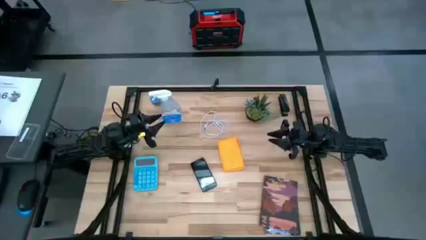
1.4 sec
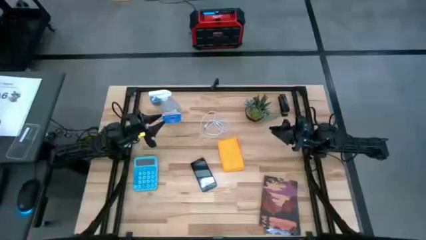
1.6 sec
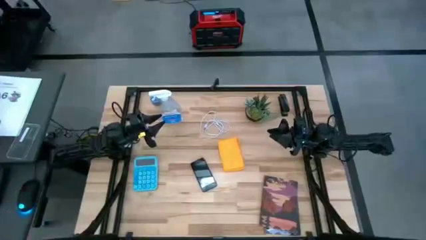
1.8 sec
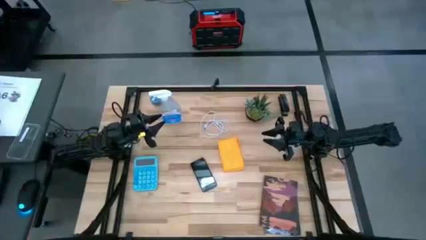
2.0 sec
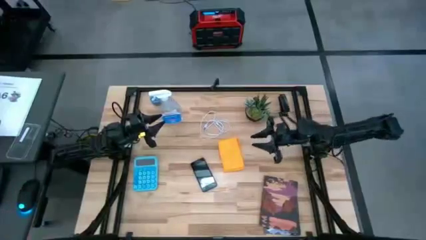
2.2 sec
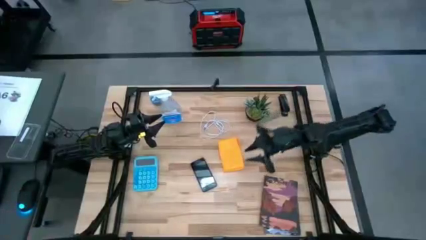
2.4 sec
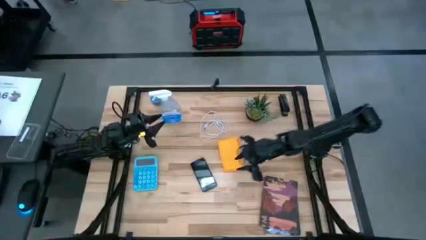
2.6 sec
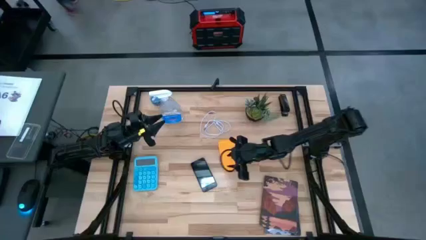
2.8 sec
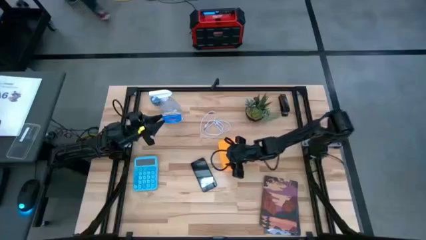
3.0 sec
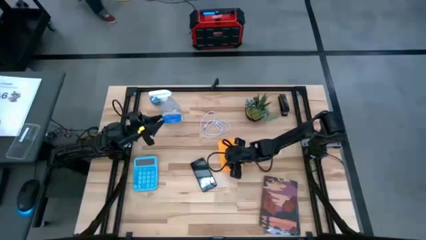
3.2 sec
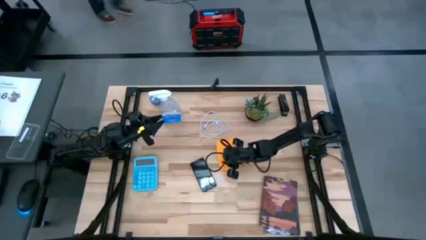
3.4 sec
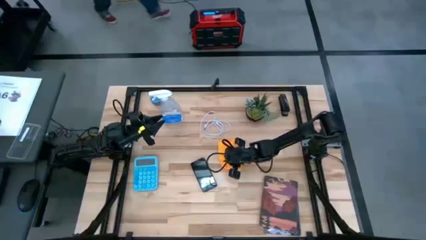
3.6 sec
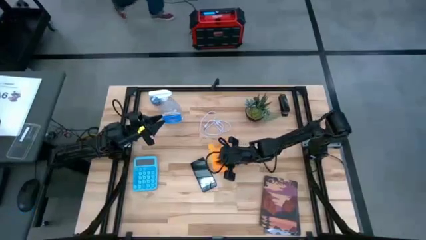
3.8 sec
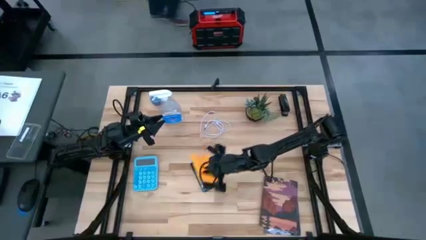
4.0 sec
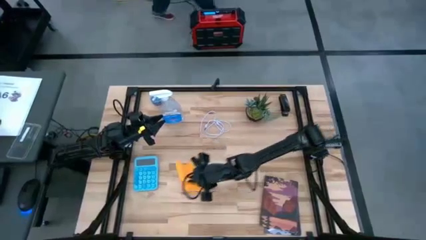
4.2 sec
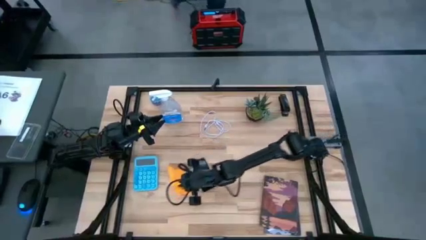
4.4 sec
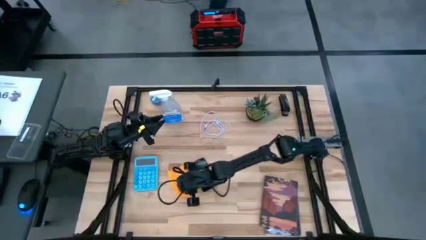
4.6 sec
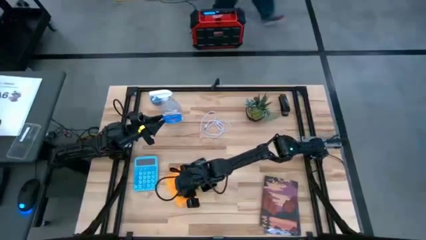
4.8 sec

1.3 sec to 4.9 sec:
Task: Apply microfiber cloth
Move the yellow microfiber cloth to the middle left of the table

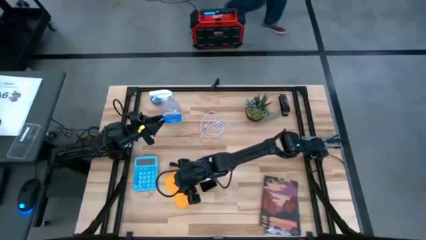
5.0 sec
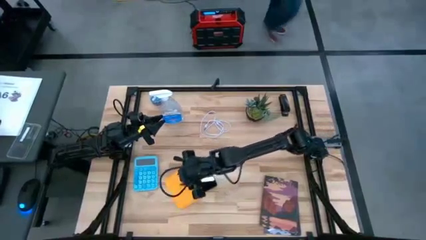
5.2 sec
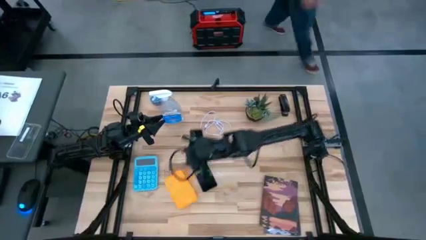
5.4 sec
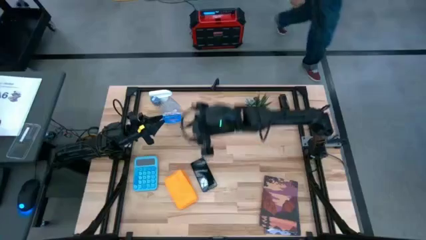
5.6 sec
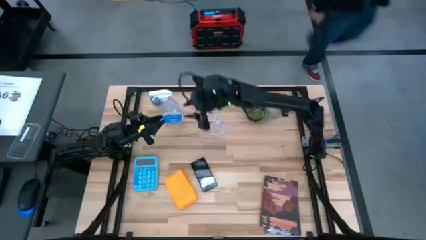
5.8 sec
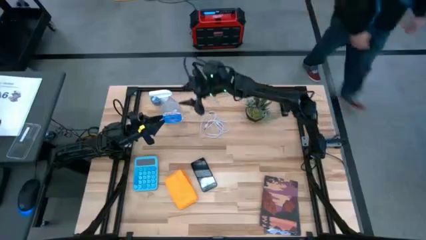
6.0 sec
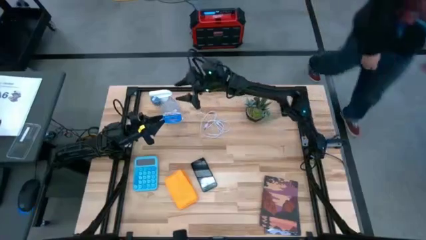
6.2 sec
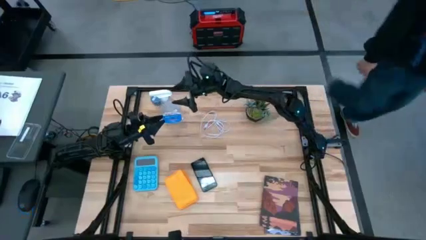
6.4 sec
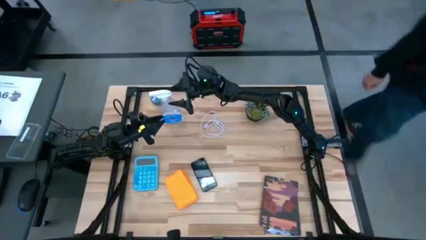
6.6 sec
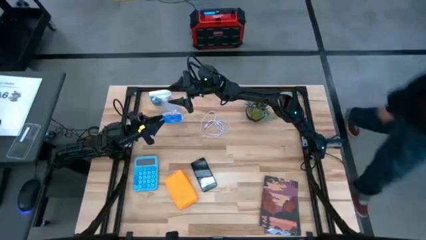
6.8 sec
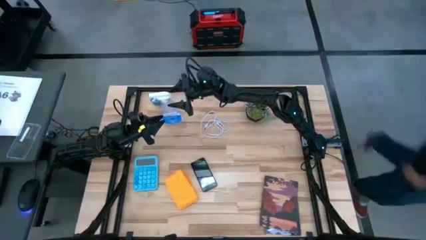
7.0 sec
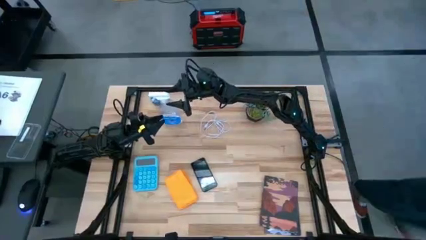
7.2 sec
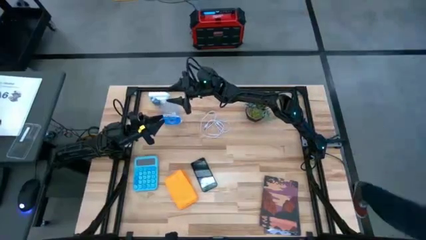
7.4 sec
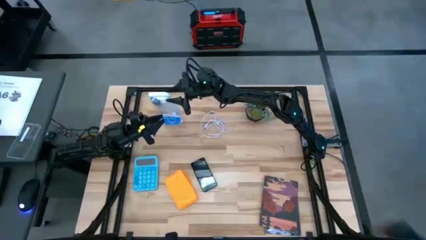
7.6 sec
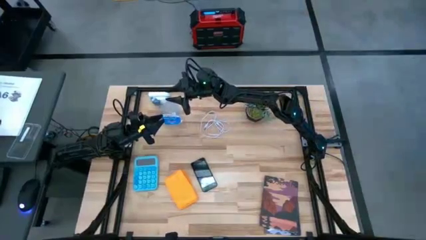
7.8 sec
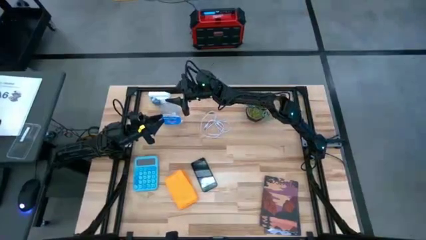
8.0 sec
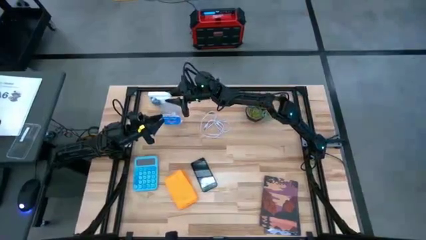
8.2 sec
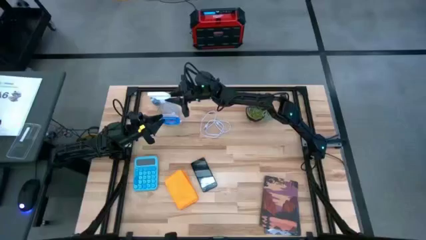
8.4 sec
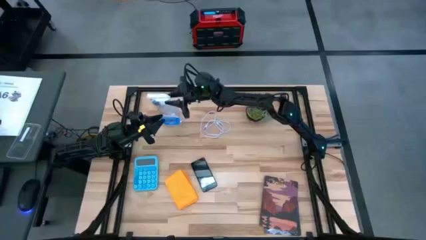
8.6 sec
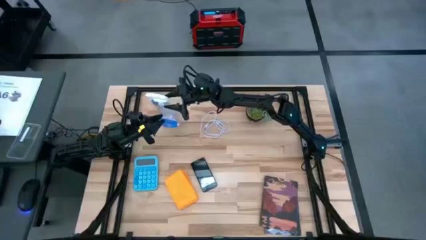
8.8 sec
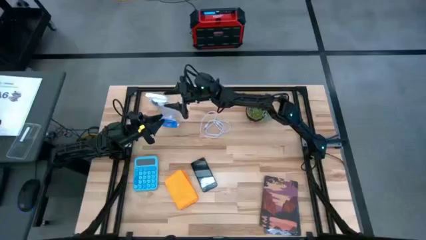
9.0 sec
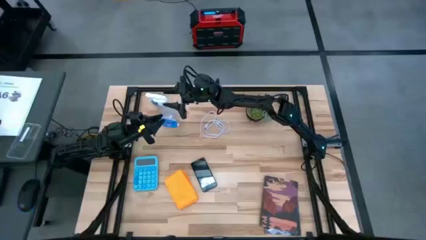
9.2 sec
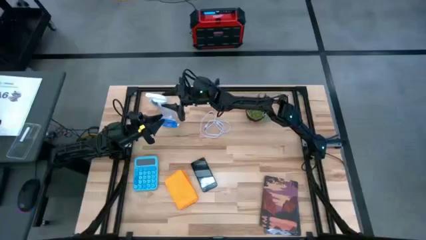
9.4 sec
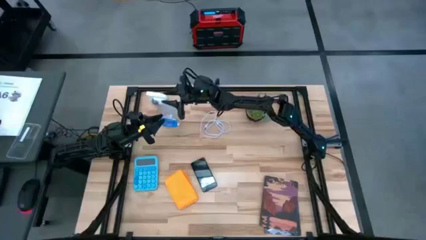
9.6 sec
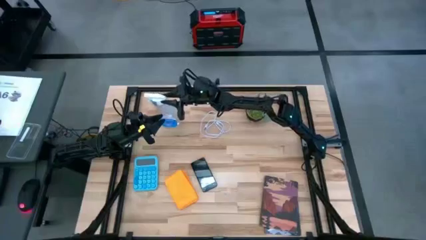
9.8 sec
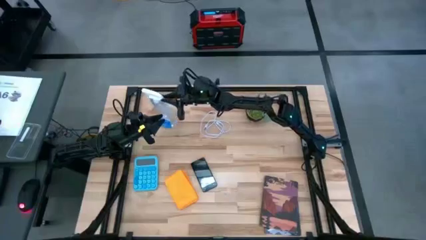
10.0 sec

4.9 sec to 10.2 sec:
Move the spray bottle to the center of the table

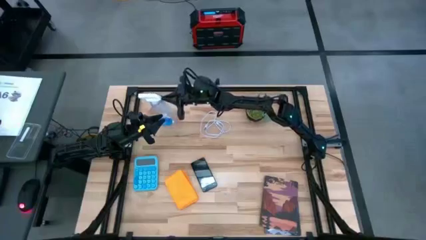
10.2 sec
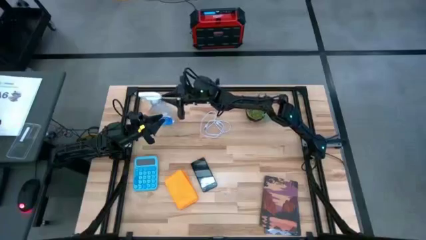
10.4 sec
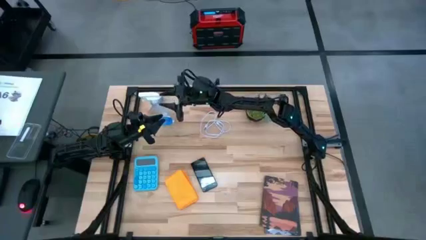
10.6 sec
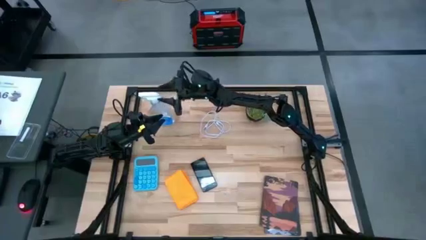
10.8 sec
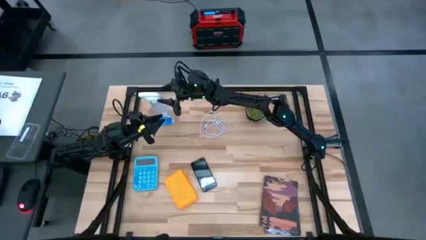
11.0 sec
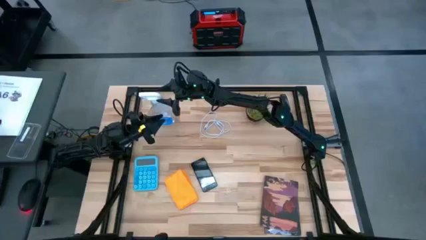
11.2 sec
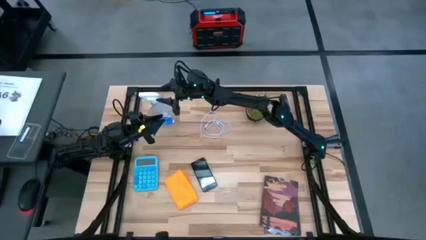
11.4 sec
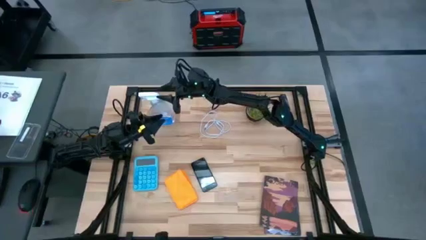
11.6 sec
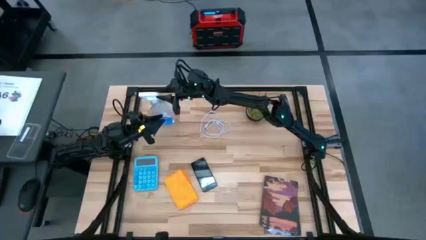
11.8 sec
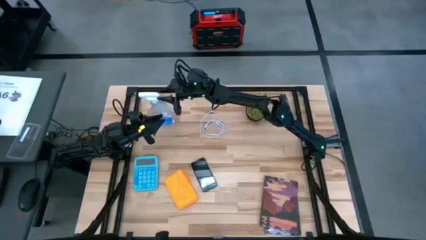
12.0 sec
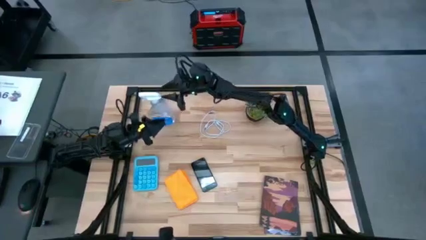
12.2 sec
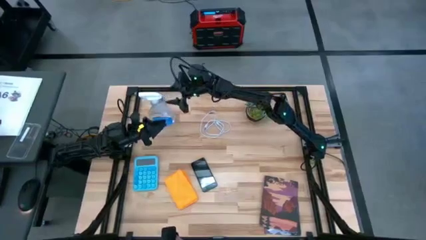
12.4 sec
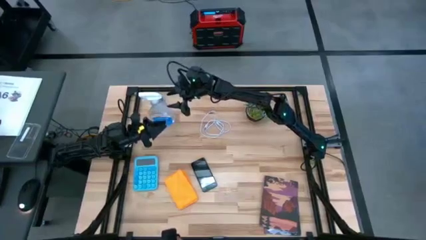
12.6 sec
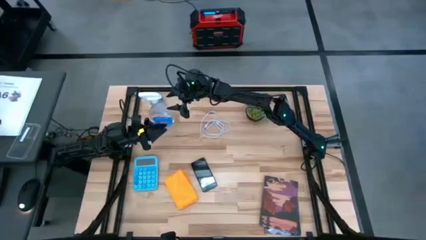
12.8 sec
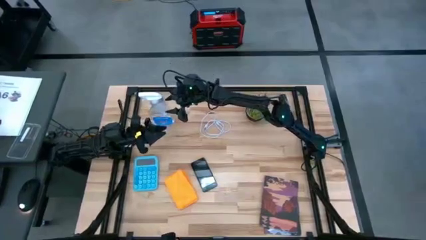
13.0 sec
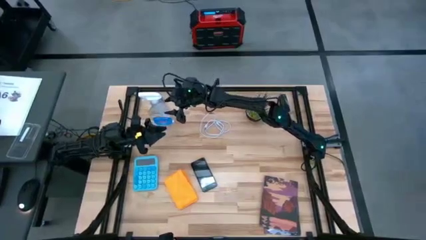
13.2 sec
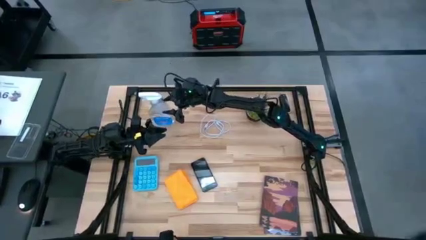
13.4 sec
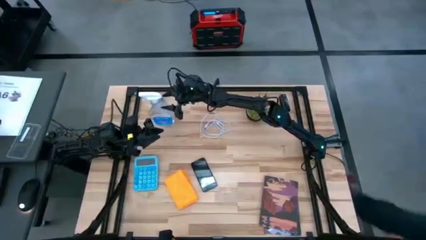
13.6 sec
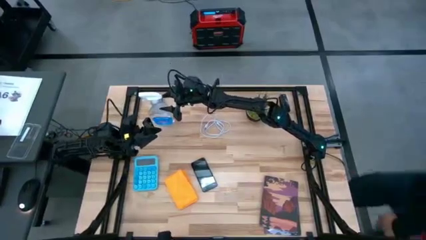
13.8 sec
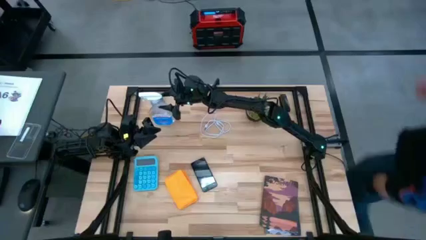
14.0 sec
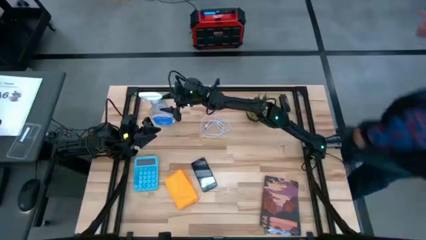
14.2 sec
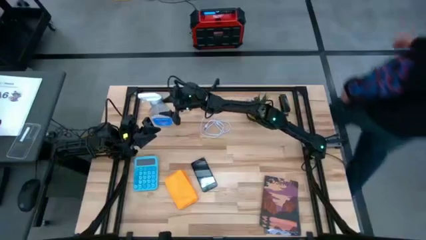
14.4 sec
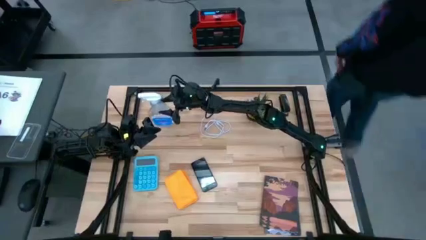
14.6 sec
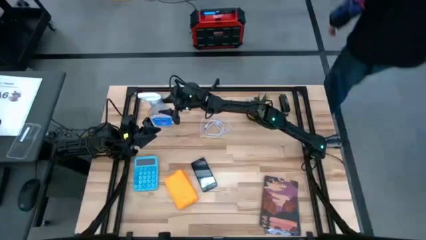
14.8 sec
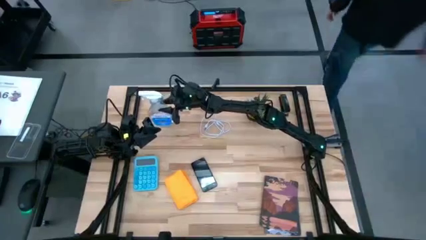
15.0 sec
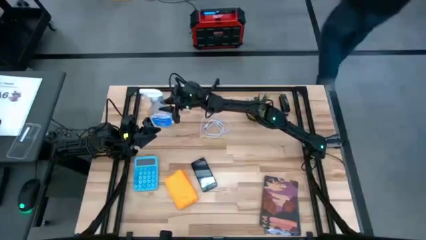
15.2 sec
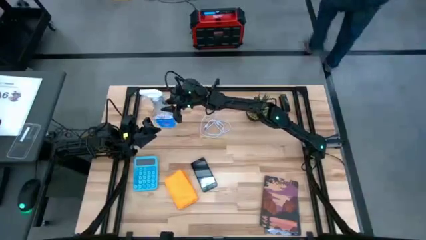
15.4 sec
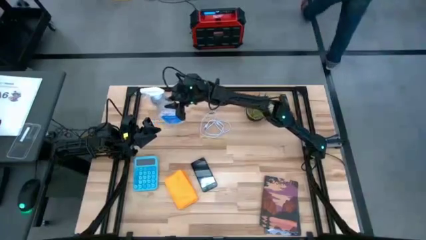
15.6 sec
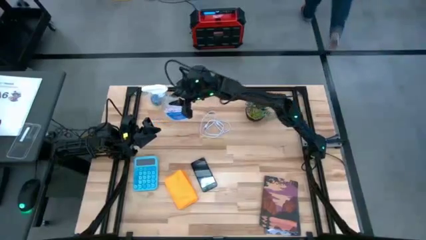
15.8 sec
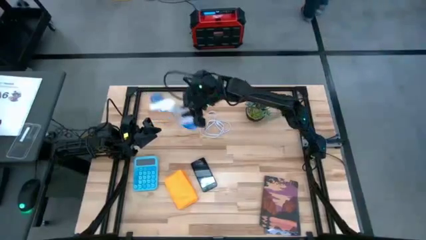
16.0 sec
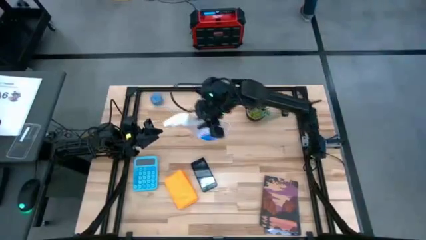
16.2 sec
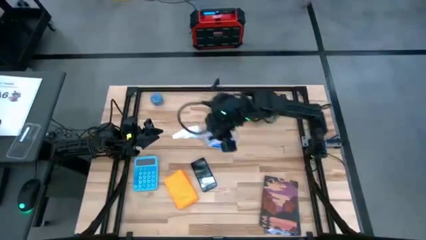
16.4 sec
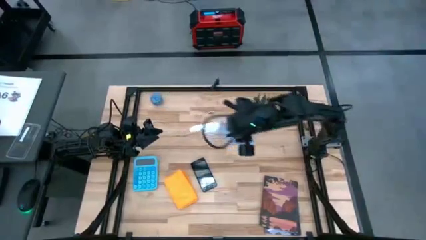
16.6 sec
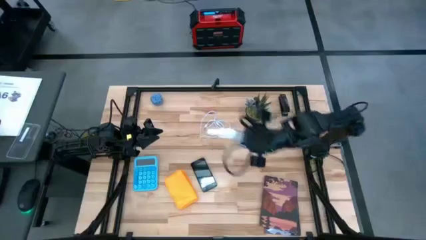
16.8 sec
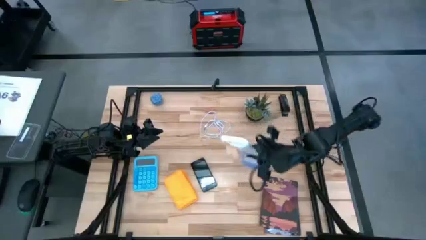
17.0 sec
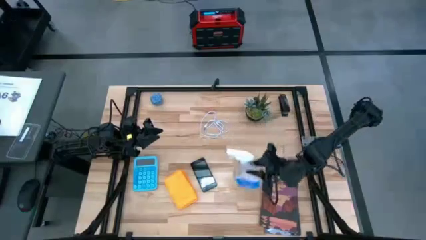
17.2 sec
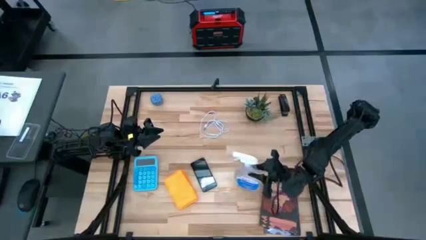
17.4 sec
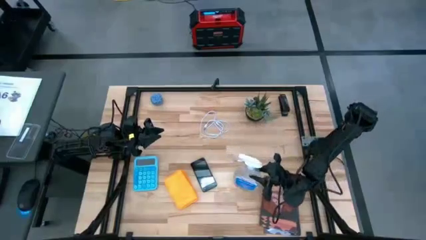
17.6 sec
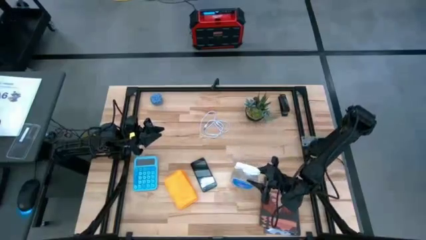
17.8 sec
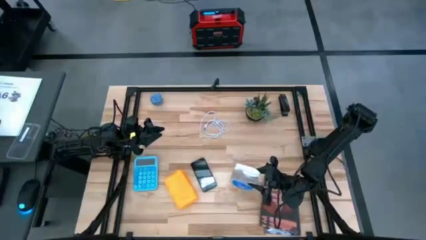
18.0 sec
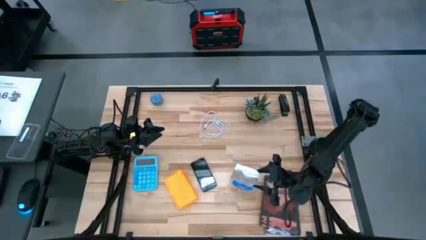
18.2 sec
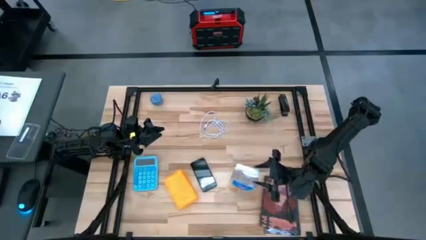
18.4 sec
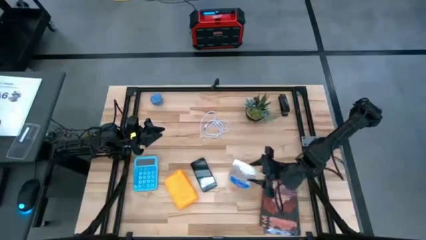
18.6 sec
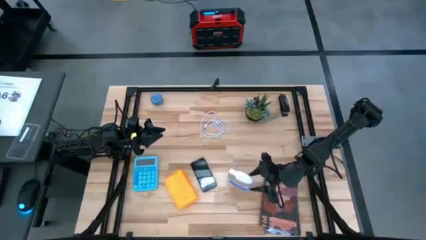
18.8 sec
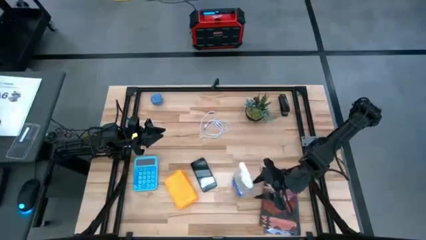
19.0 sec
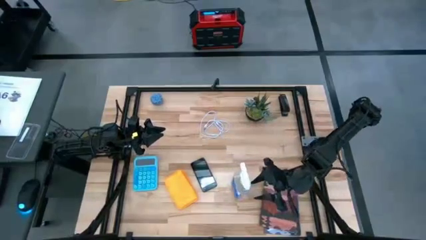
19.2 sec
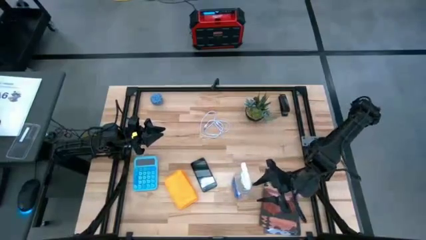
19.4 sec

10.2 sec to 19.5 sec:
Move the spray bottle to the center of the table
